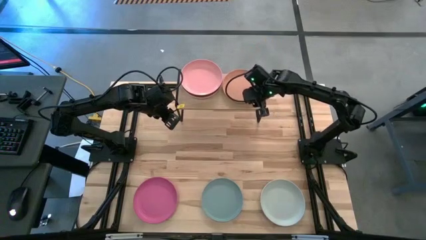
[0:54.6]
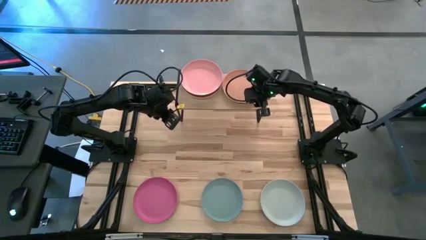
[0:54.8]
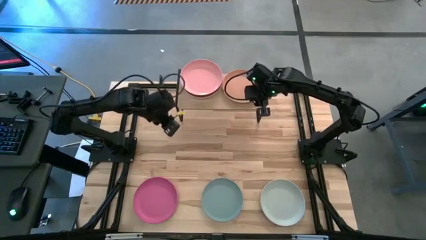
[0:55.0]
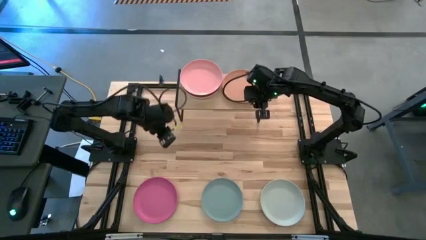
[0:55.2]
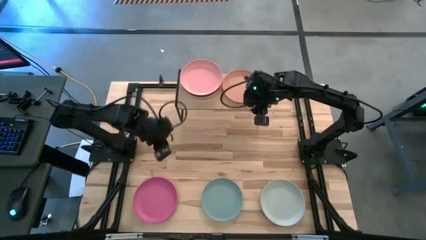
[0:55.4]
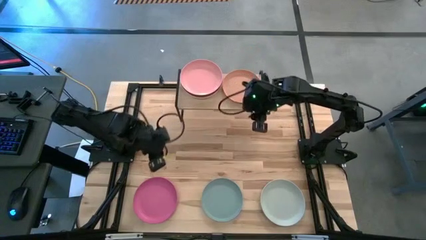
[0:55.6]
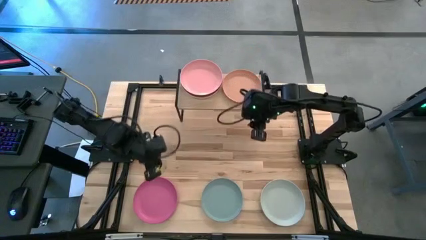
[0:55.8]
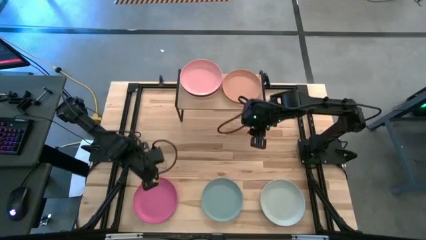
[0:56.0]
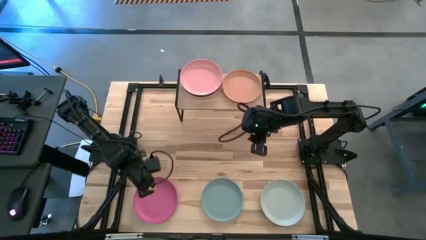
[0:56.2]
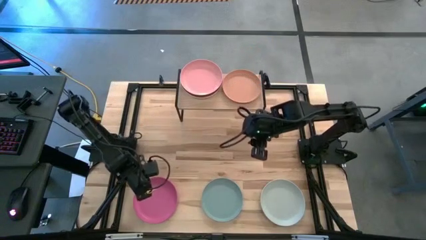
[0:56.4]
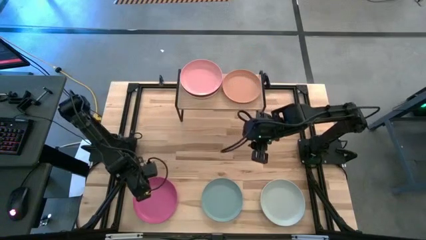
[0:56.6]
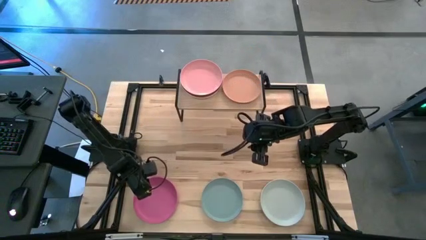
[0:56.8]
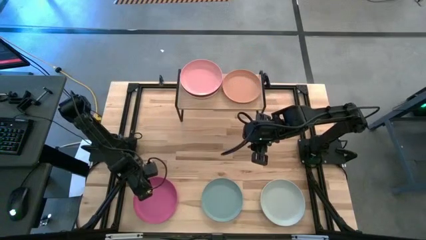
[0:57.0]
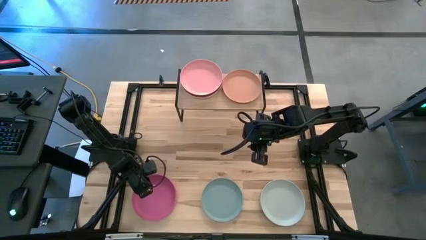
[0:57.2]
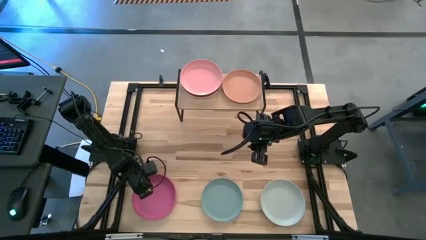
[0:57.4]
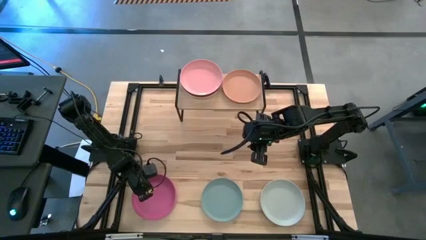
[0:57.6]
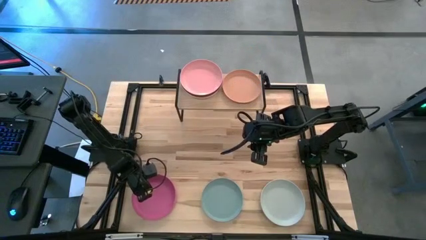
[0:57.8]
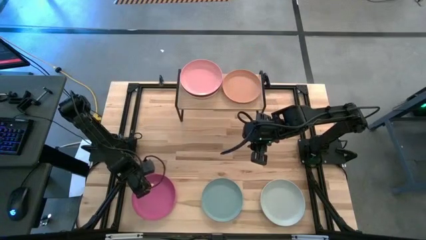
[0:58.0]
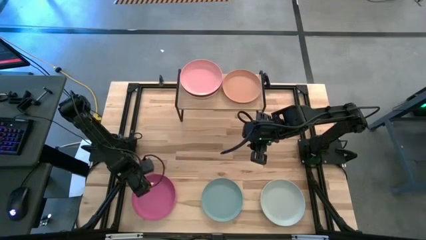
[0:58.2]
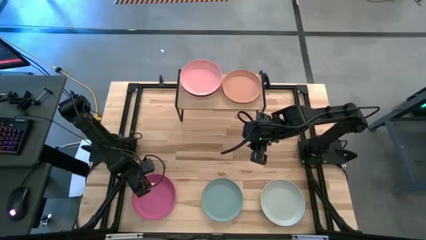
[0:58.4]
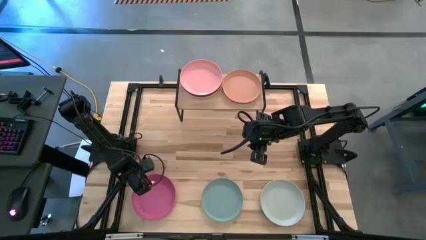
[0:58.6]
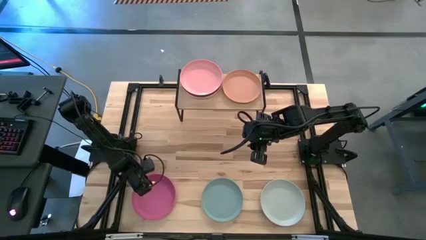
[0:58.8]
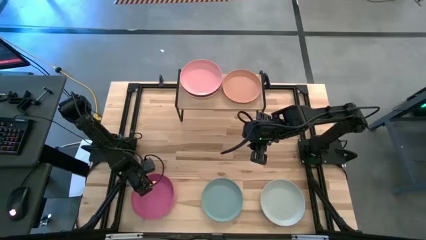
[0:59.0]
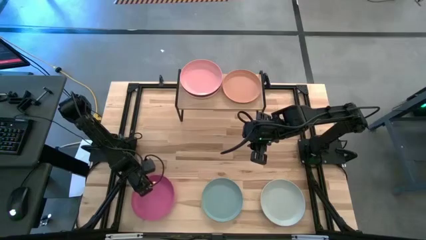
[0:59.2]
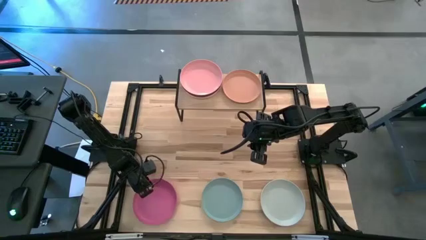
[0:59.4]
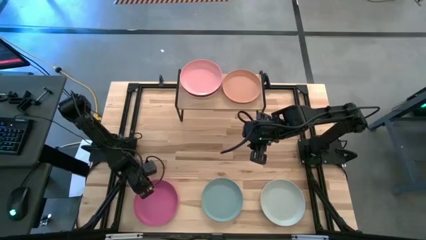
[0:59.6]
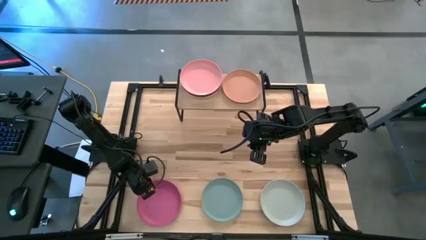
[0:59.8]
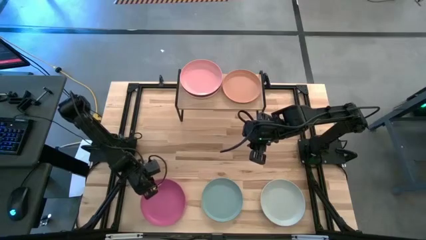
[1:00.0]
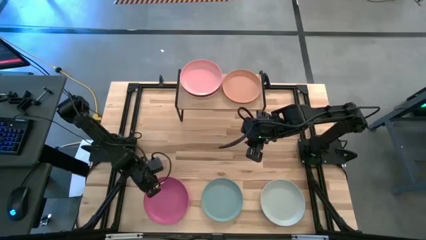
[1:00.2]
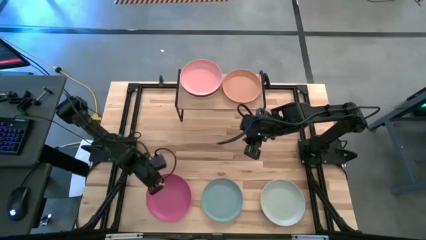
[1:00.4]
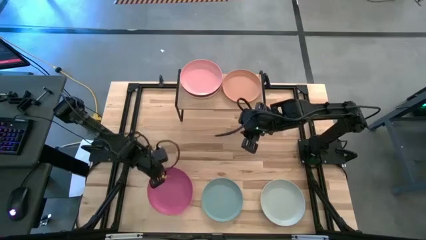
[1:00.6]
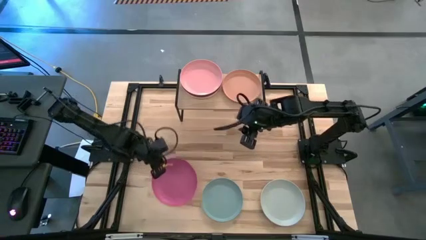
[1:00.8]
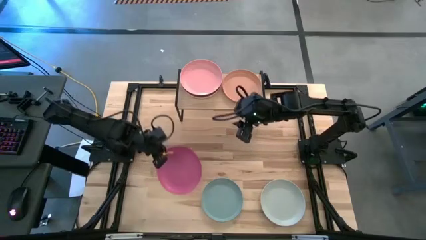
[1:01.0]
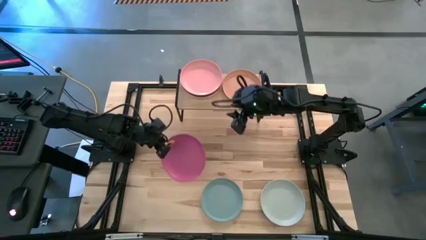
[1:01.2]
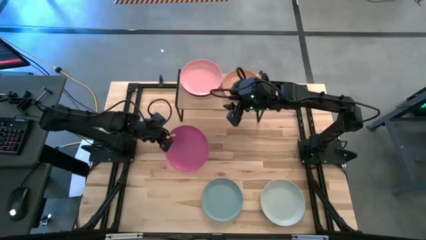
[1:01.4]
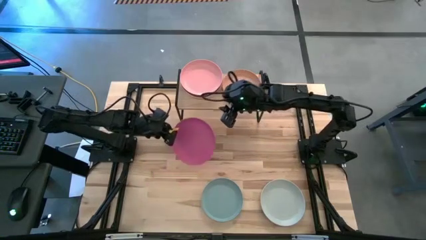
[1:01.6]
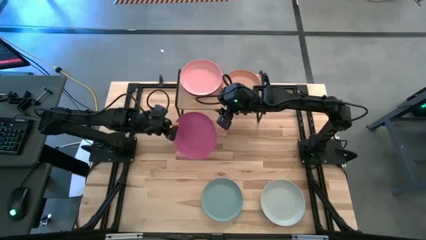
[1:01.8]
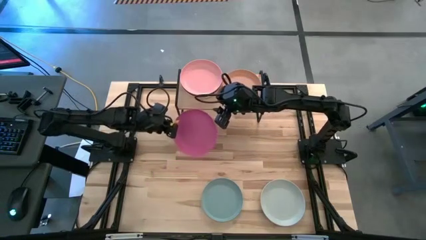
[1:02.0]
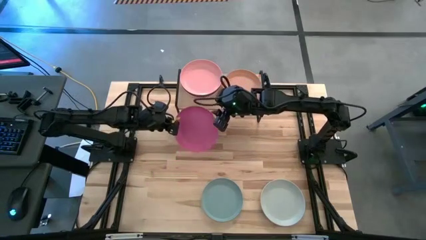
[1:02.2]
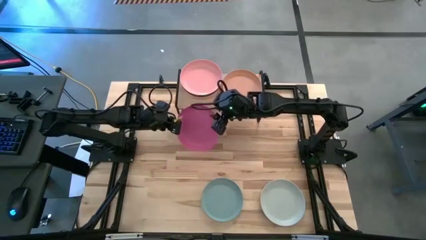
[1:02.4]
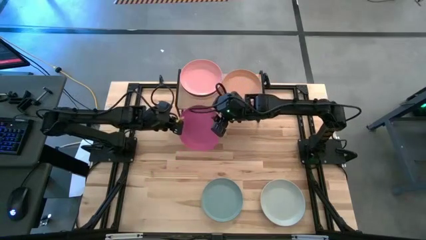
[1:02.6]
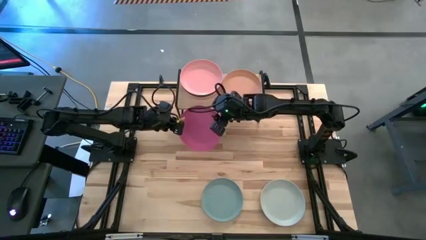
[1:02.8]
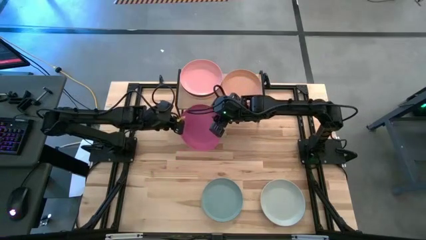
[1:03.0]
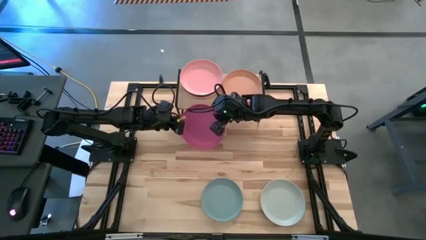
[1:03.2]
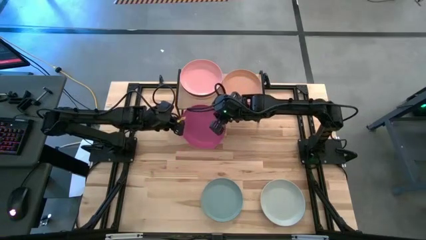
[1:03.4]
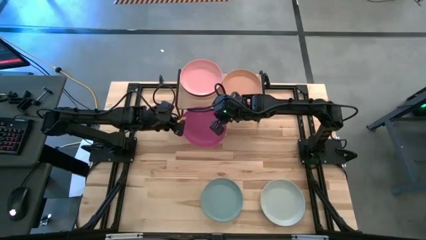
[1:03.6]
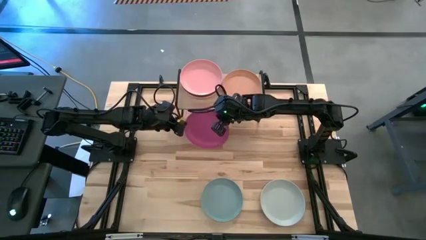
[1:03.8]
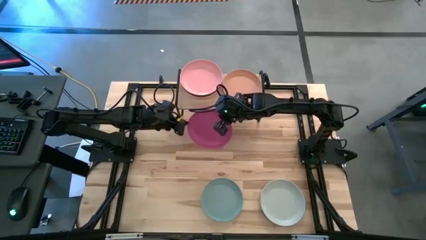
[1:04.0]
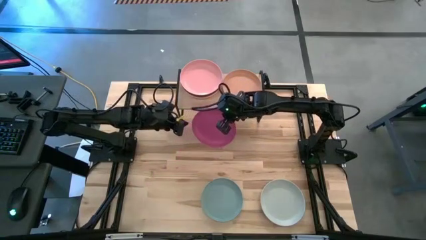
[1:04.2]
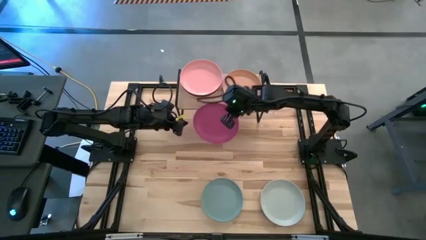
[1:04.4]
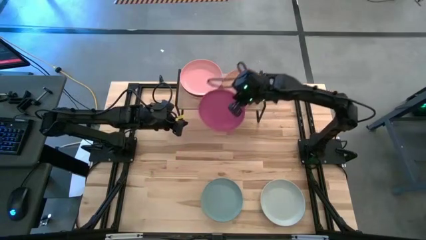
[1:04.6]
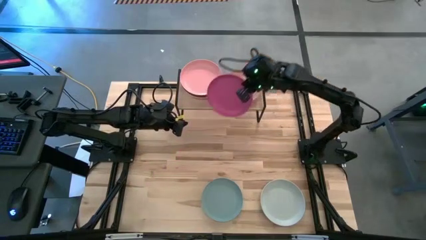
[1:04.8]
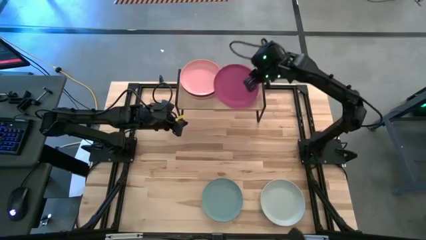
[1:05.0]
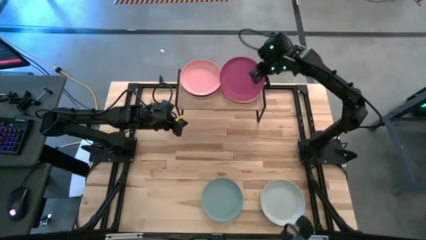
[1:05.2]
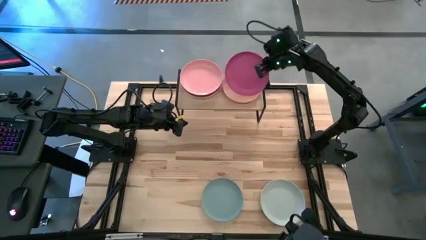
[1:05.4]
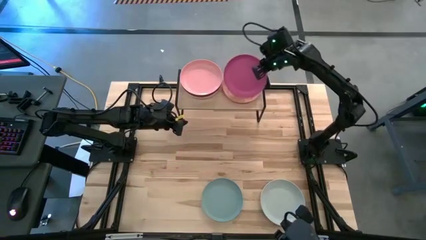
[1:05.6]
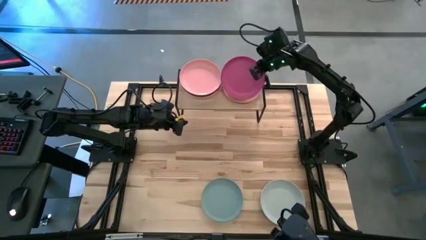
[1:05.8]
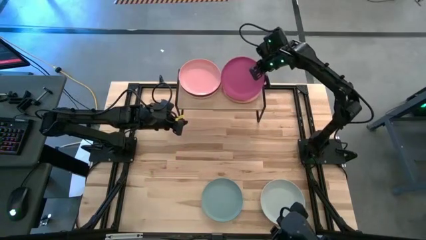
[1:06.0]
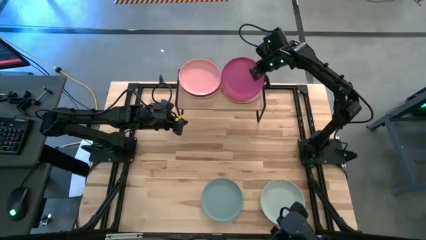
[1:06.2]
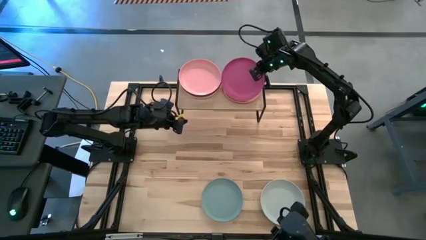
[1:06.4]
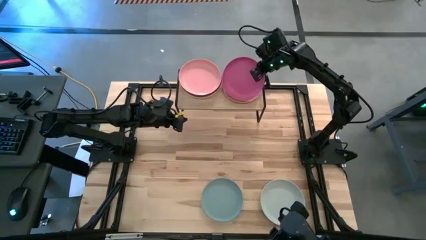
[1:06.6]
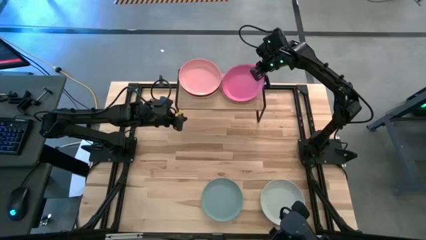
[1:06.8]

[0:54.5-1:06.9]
Task: Place and stack plates onto a shelf
Stack the pink plate on top of the brown plate on the shelf

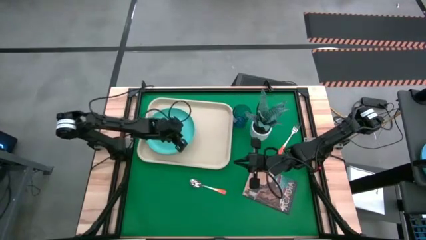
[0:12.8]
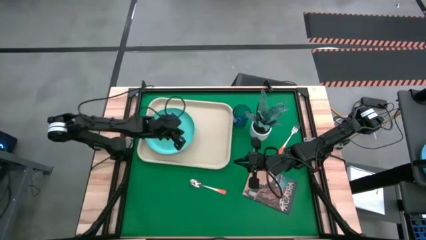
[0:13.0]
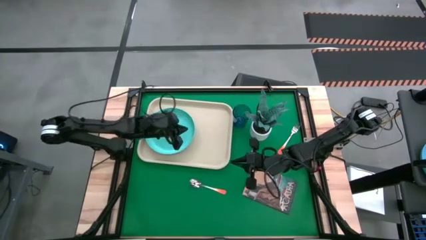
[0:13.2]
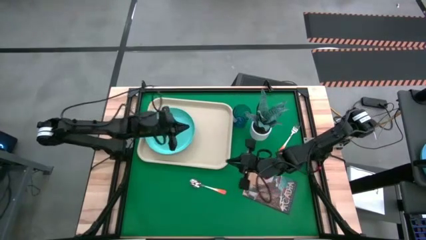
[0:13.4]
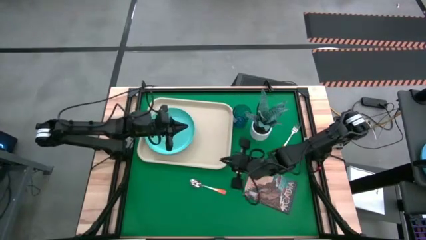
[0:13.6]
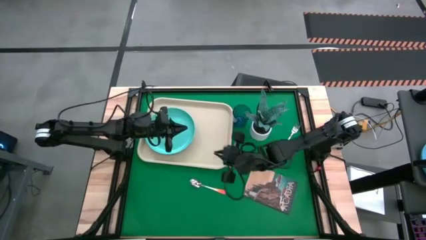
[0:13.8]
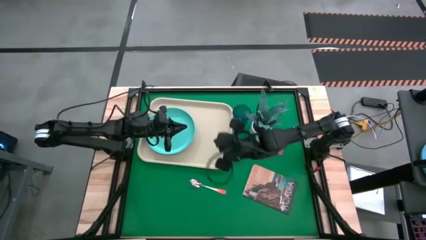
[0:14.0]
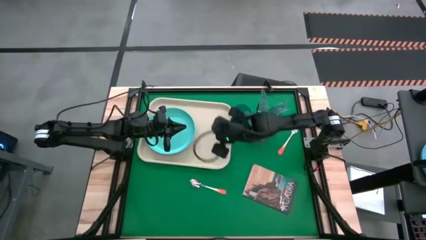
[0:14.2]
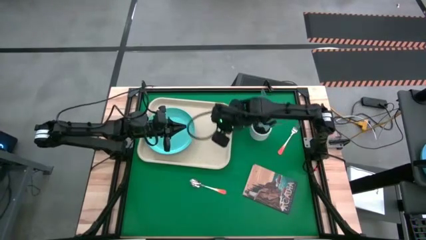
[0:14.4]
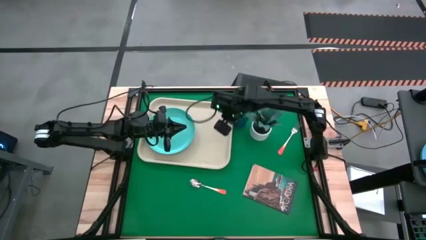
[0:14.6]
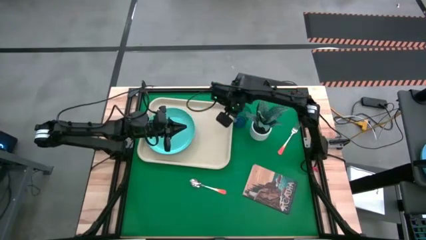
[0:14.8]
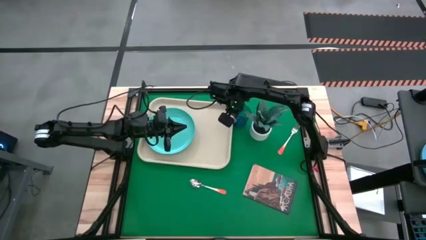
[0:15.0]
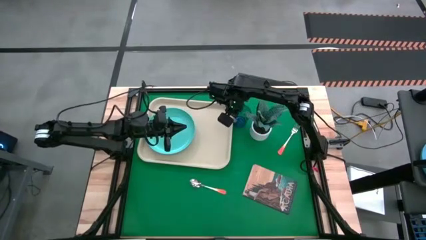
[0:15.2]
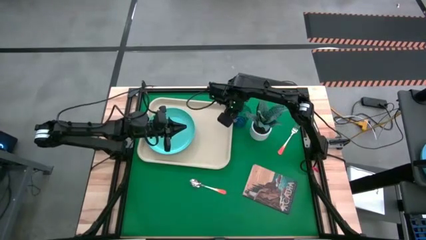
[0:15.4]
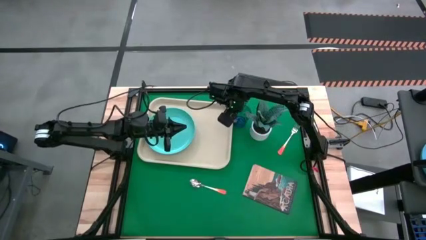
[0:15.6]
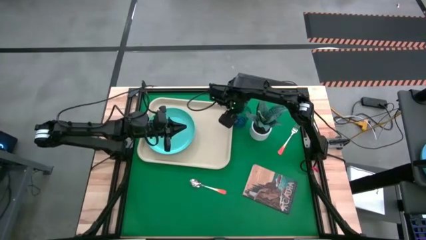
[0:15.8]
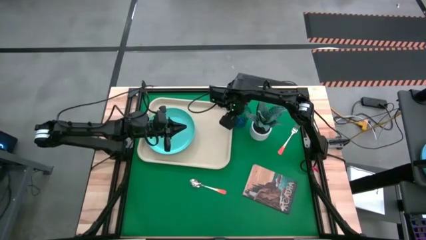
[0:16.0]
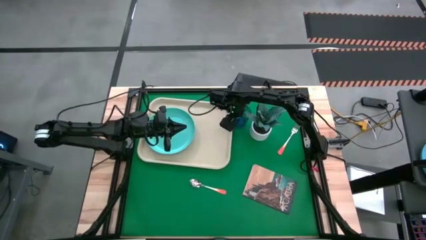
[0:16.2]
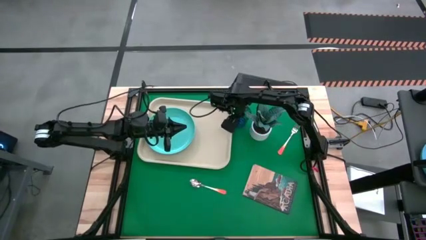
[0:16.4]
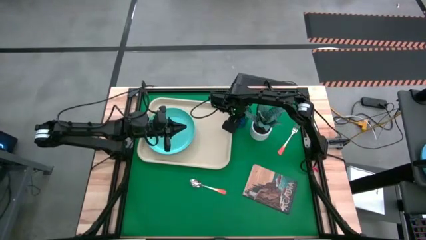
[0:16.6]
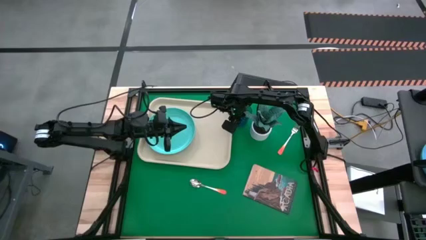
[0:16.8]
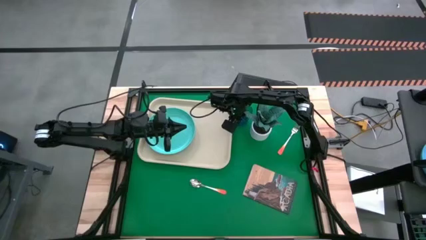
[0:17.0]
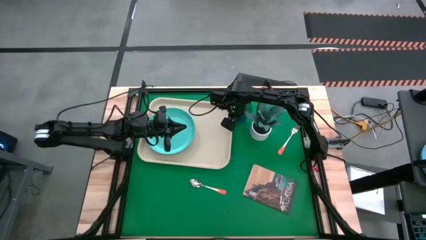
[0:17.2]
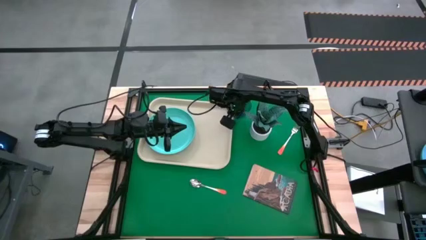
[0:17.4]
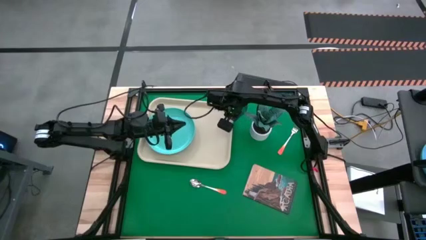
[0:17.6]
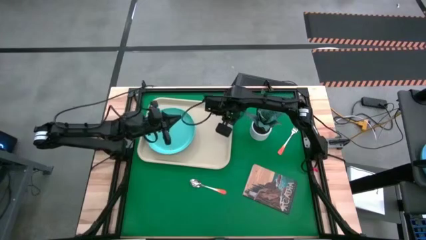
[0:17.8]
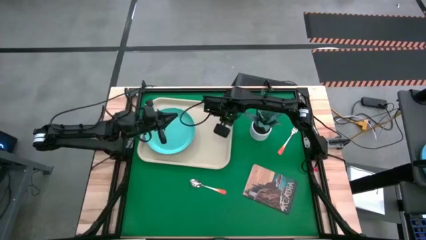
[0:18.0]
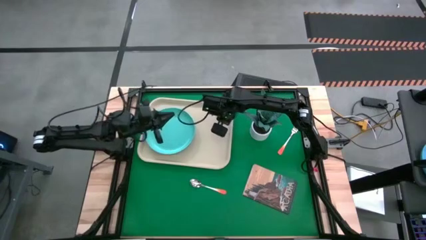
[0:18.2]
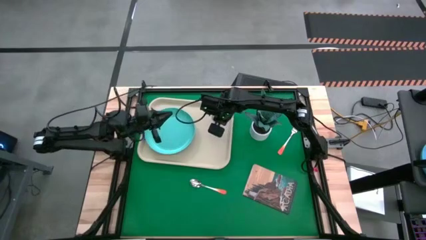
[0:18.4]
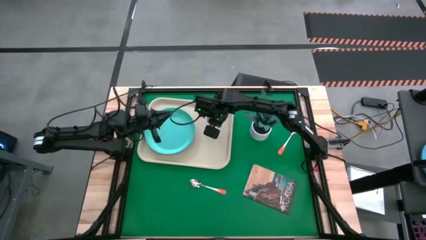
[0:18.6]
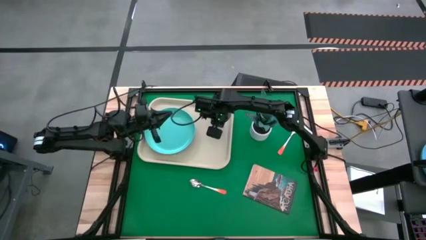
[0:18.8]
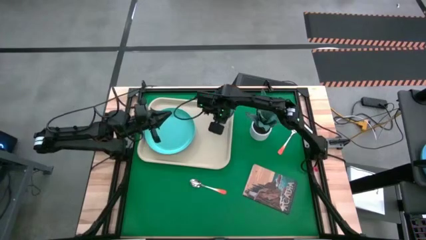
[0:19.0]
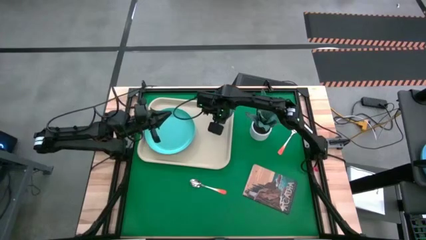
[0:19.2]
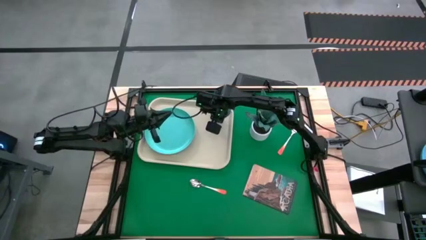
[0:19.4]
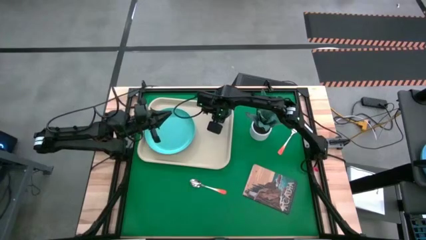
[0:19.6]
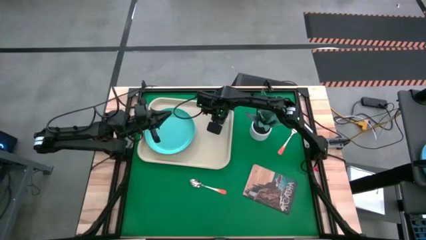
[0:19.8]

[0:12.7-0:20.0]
Task: Pick and place plate/cup/fork/spoon on tray
Put the blue cup on the gray serving tray
